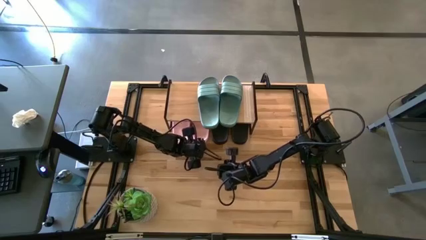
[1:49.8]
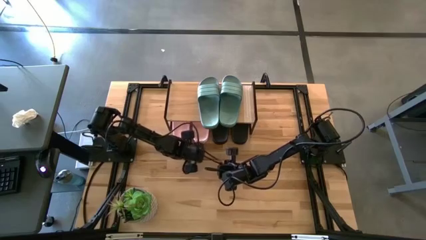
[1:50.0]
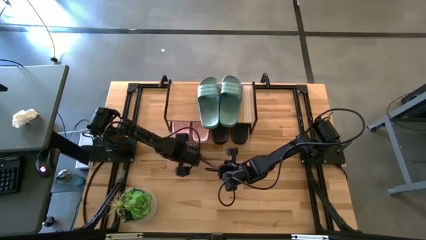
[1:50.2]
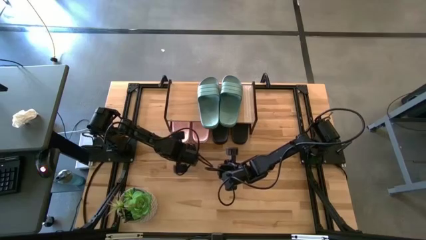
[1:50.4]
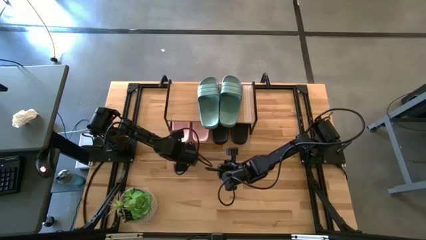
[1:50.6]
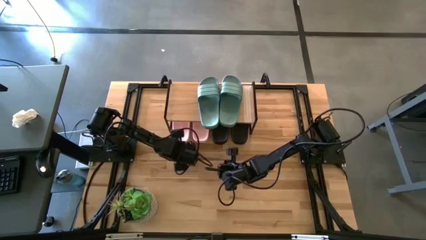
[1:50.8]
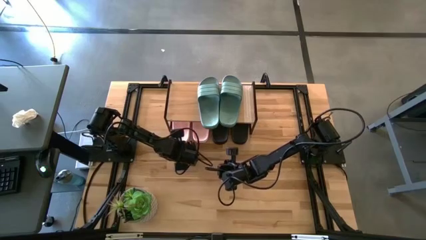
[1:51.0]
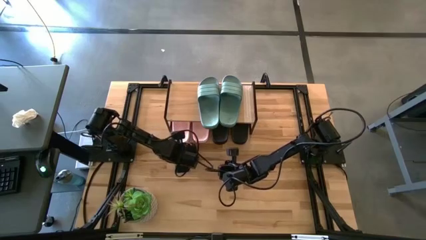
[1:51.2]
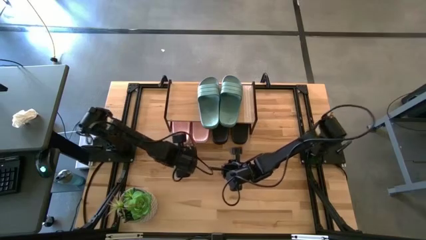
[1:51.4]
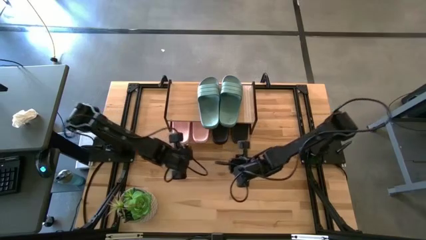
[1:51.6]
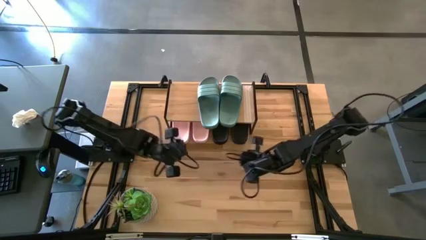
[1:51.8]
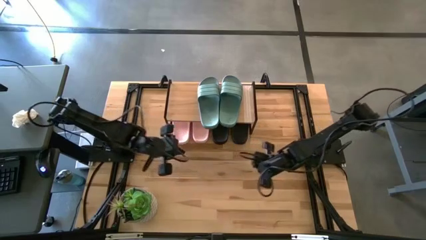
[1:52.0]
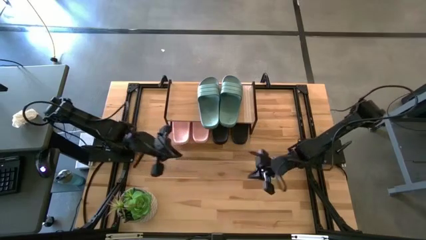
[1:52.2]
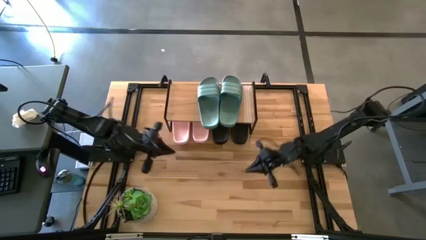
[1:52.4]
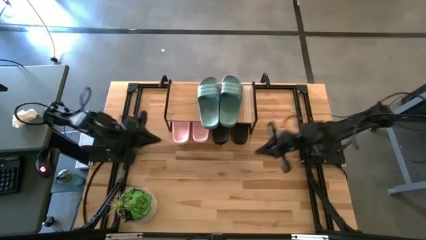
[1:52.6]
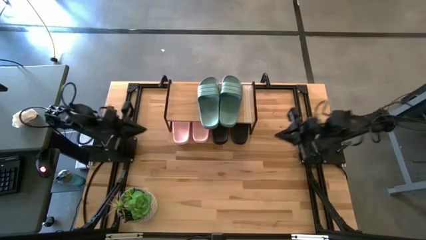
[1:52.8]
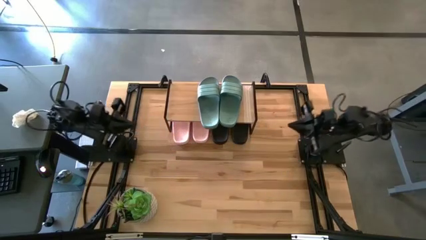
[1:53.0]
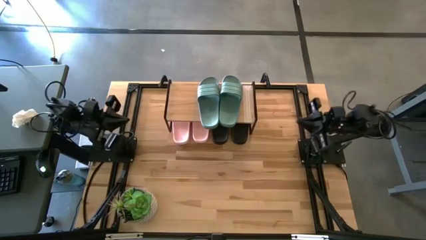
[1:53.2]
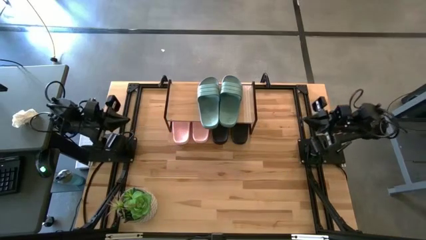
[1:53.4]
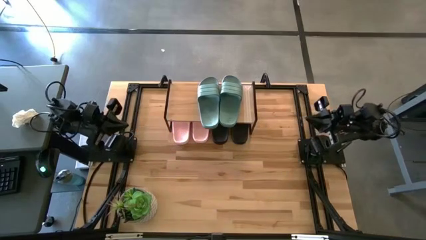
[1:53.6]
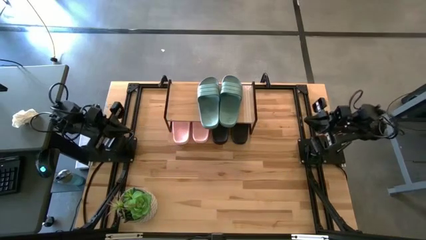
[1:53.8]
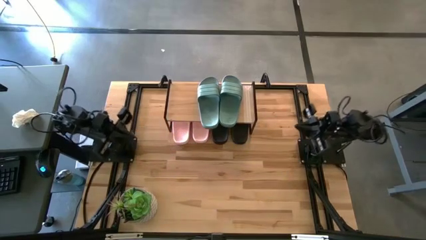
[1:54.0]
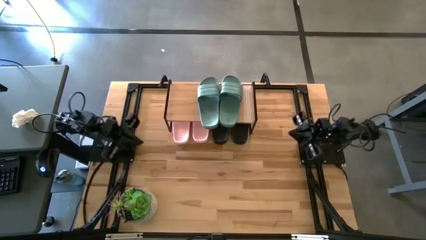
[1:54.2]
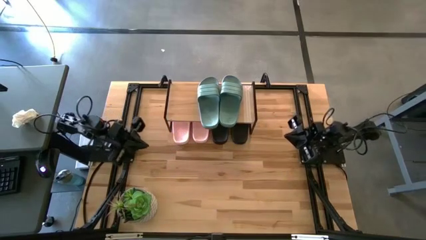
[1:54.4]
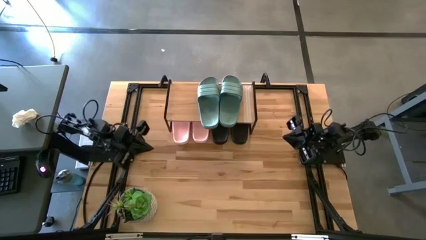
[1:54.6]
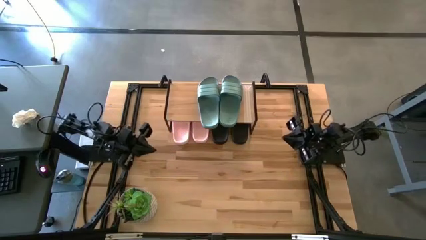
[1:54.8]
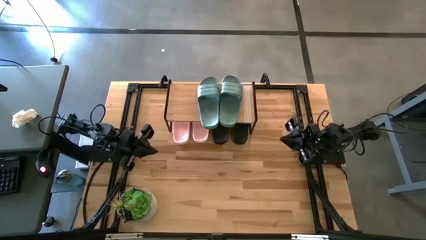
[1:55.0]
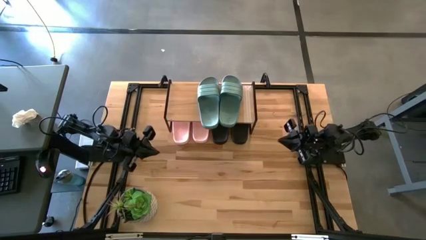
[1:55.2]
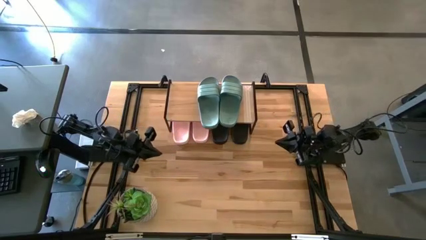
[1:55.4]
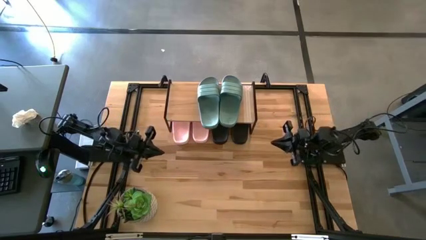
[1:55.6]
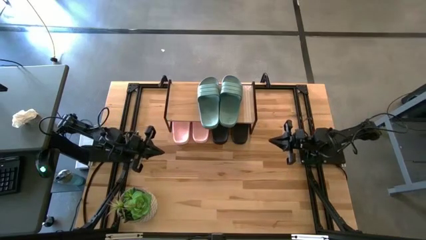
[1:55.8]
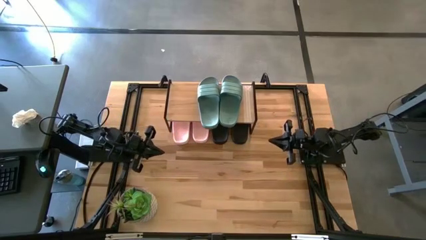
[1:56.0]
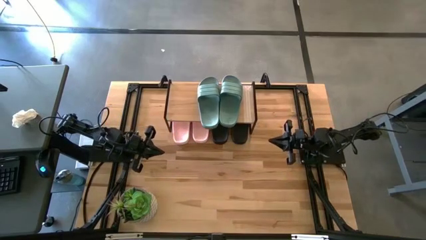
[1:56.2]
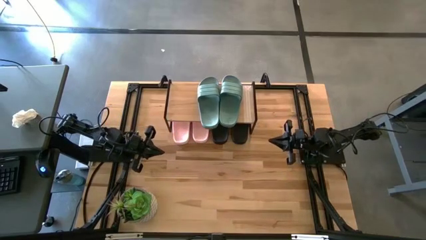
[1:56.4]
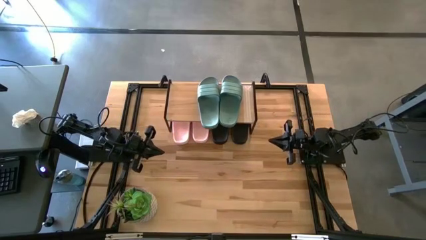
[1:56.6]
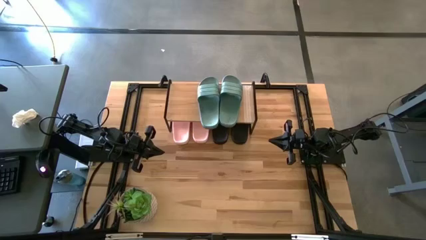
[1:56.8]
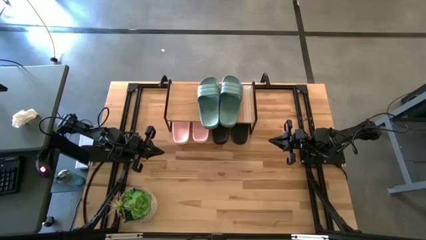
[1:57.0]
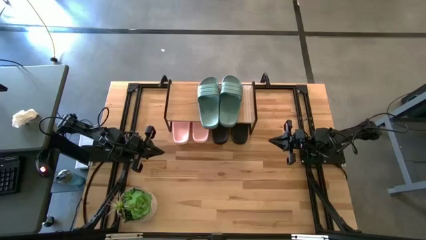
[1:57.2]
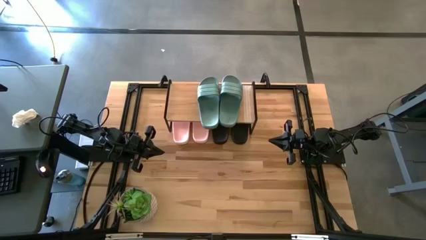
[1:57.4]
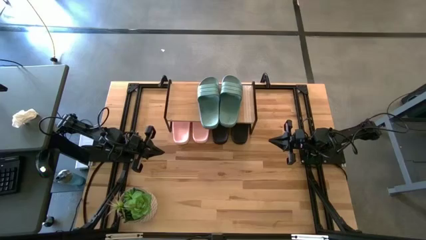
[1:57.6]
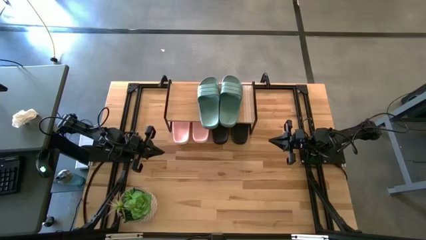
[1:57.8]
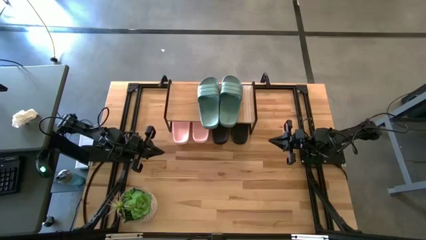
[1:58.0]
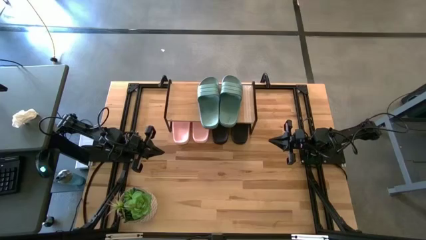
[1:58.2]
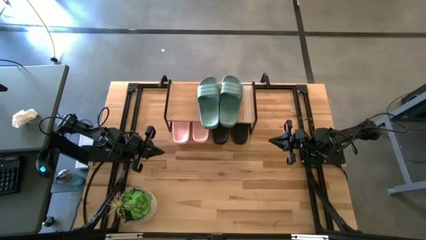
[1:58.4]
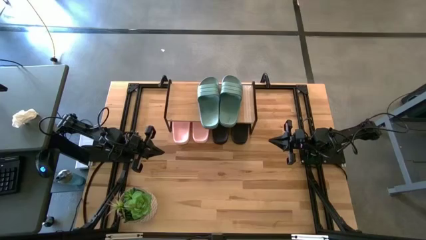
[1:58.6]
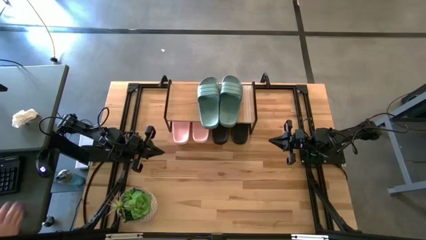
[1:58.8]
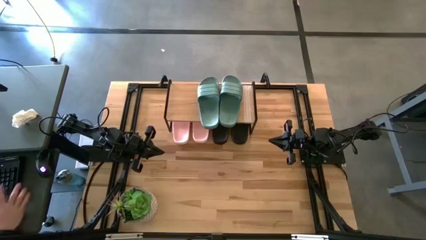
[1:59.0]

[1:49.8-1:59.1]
Task: Pick and place slides into the shelf
Return to home position
